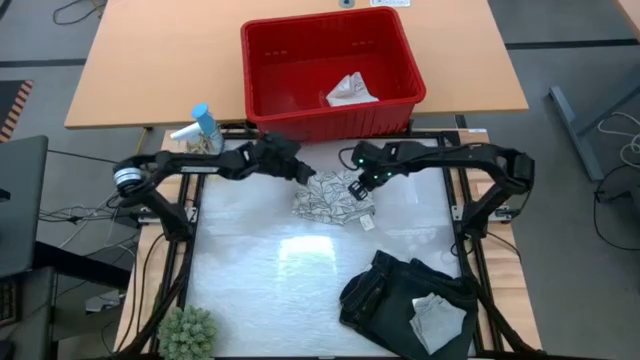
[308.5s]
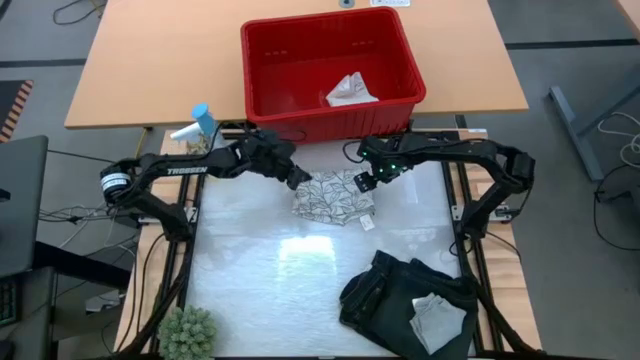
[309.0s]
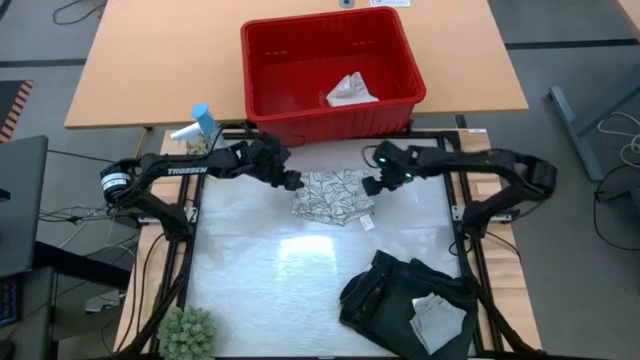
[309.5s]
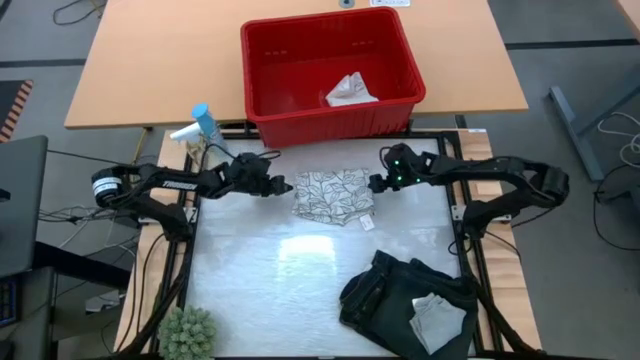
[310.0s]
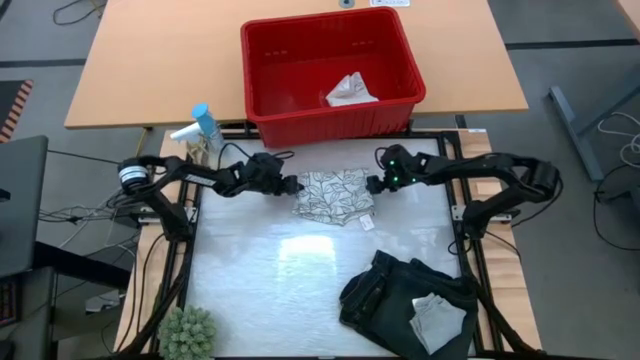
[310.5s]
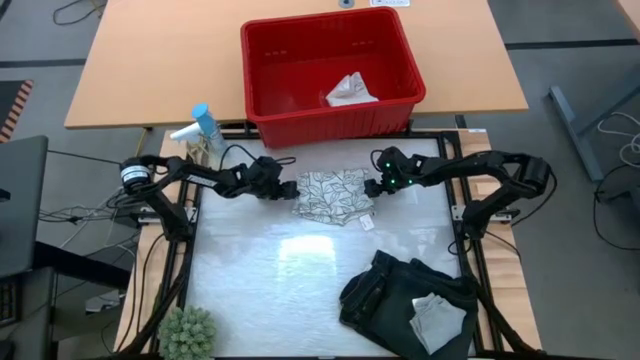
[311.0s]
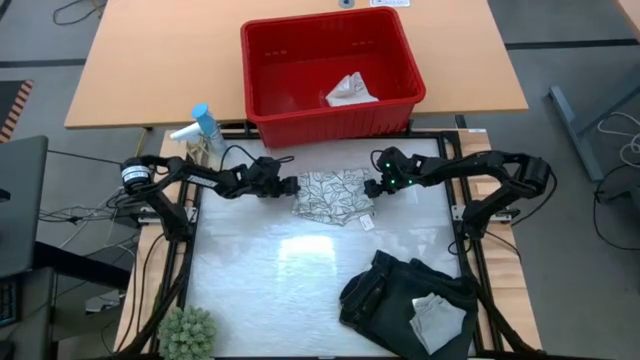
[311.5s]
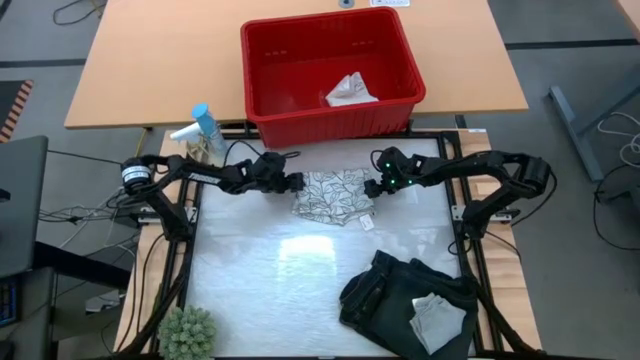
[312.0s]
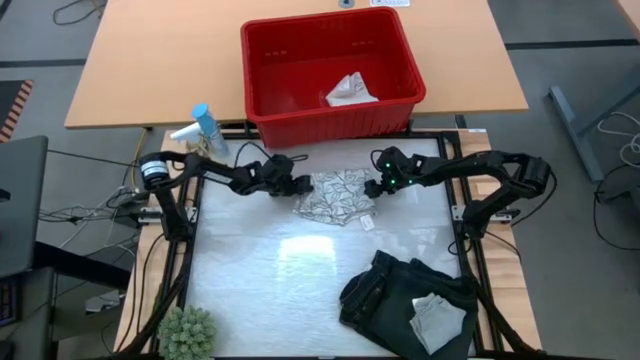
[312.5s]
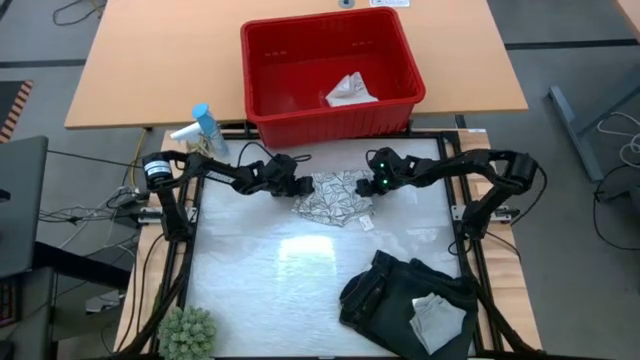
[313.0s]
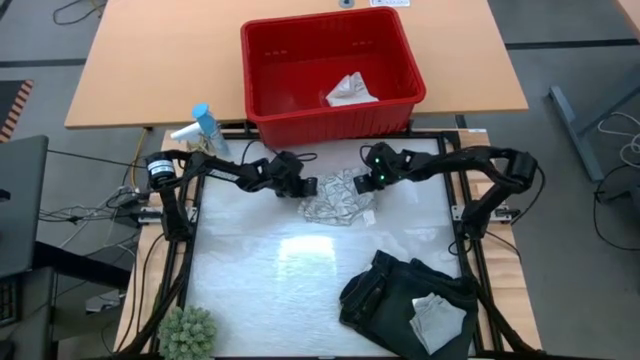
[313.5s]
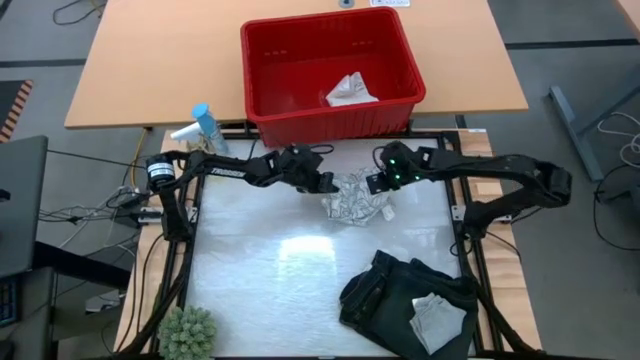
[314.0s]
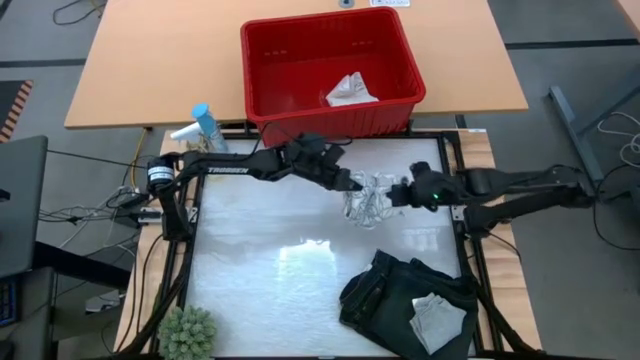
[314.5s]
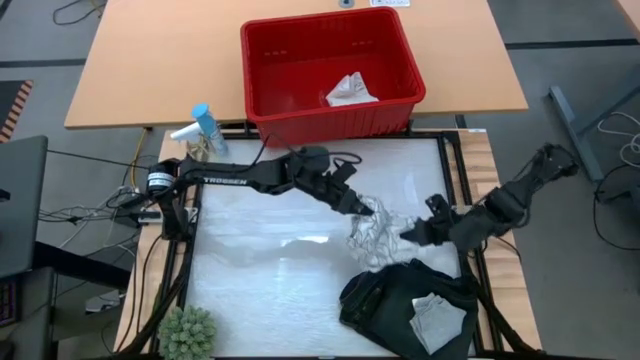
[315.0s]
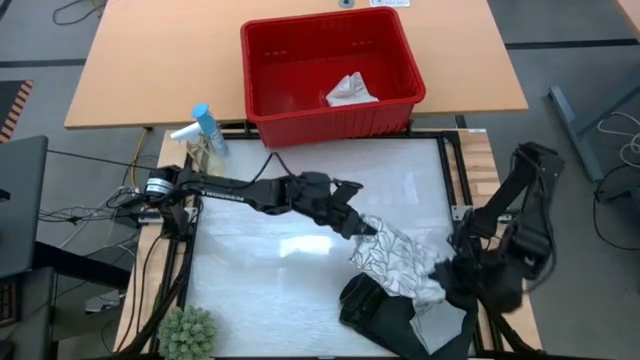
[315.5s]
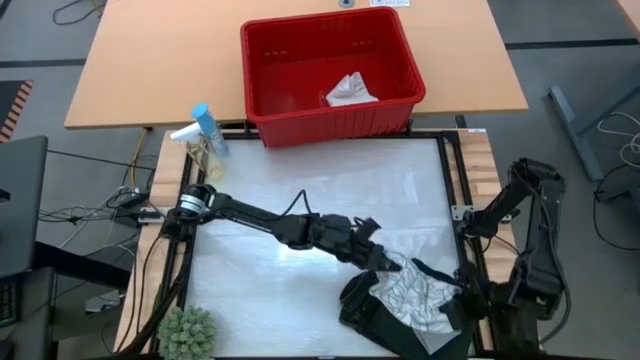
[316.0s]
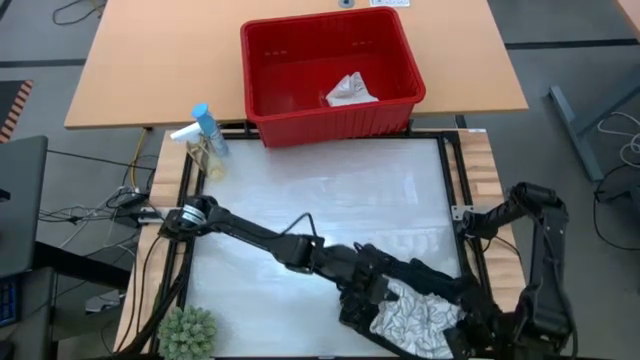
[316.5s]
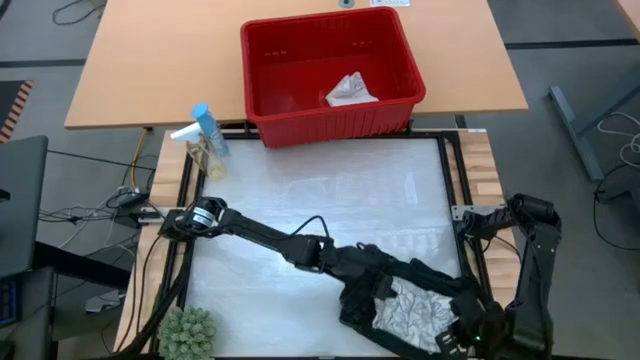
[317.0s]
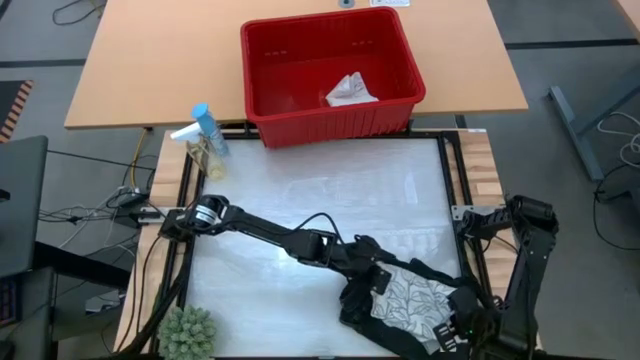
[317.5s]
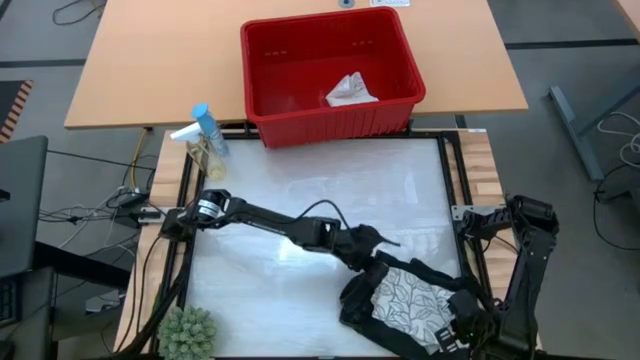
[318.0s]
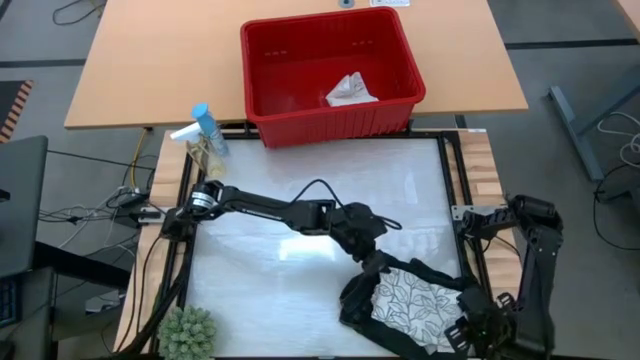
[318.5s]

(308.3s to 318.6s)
Task: Fold Laundry from Bin
Stack the white on top of the gray boxer

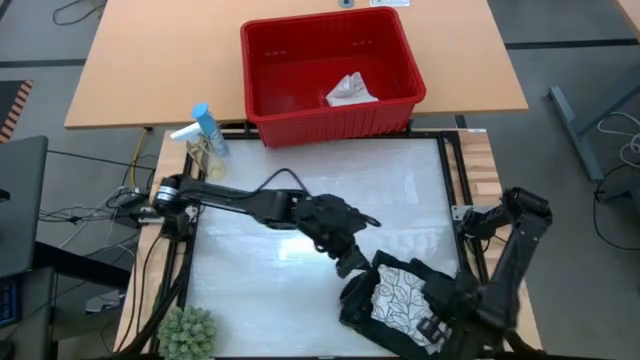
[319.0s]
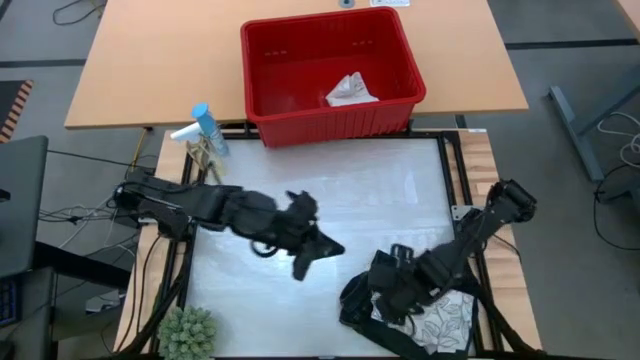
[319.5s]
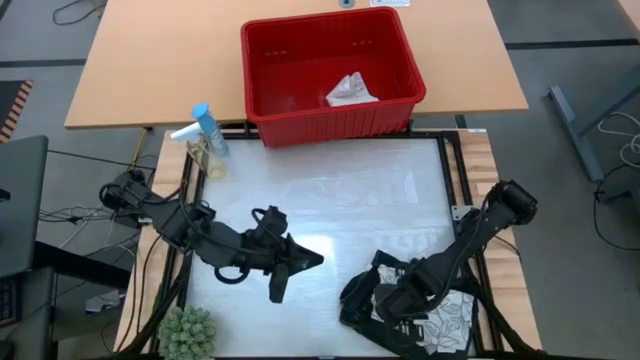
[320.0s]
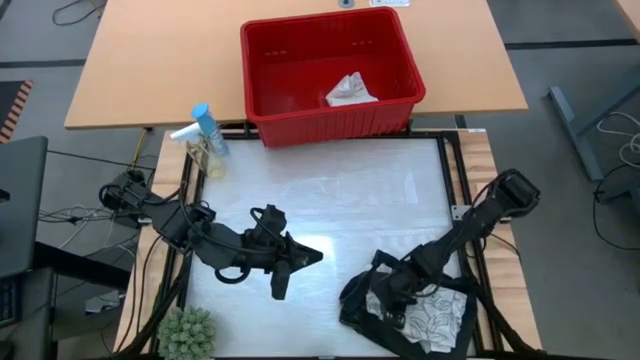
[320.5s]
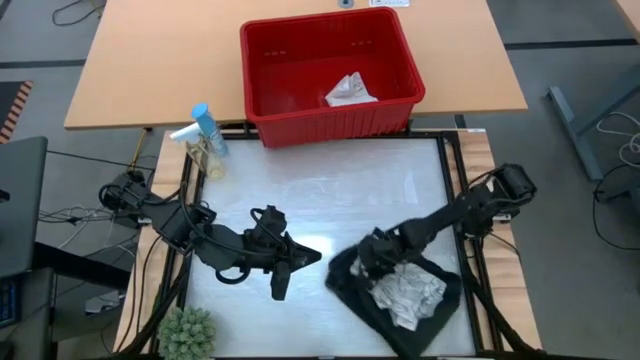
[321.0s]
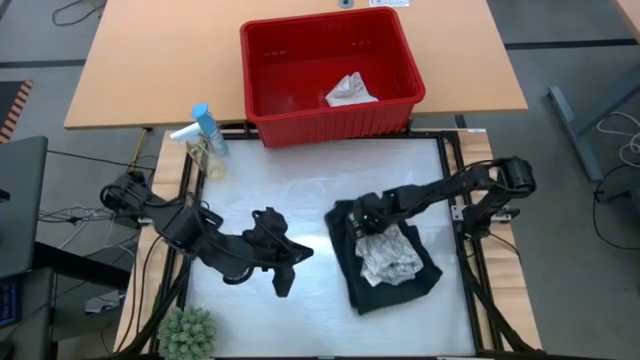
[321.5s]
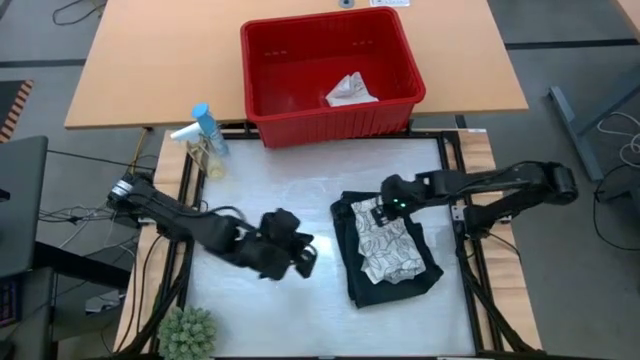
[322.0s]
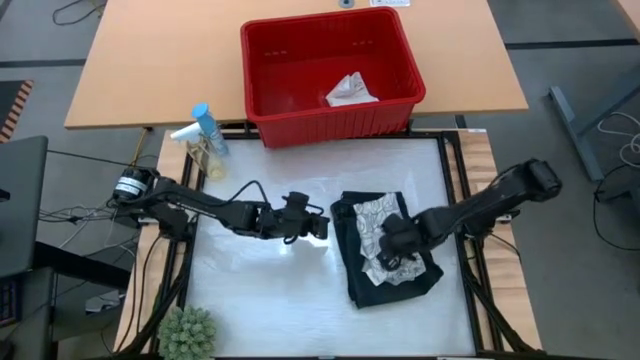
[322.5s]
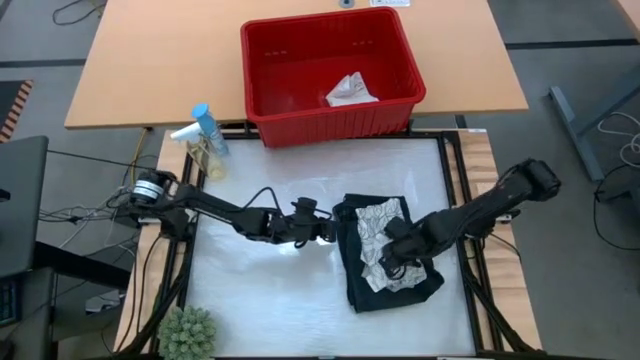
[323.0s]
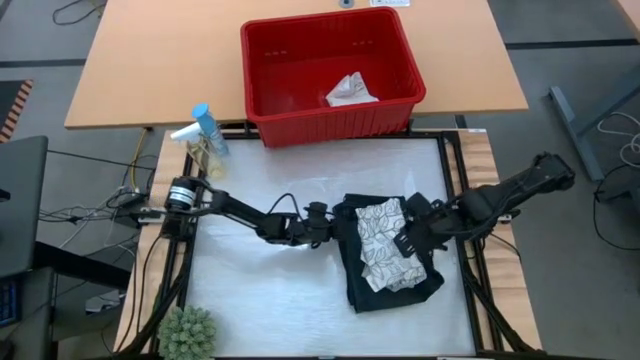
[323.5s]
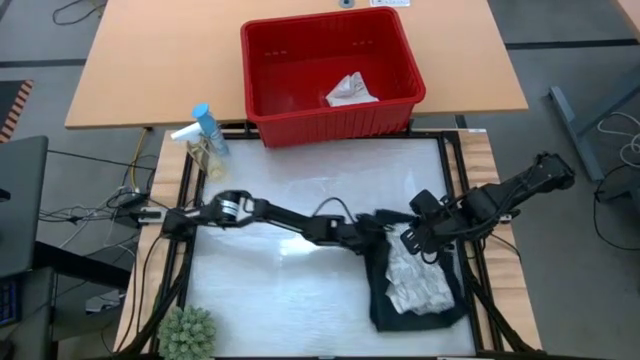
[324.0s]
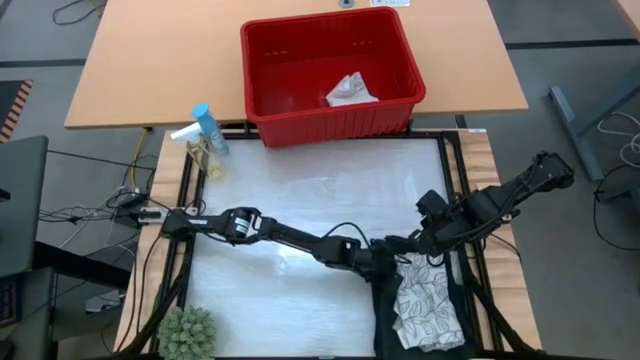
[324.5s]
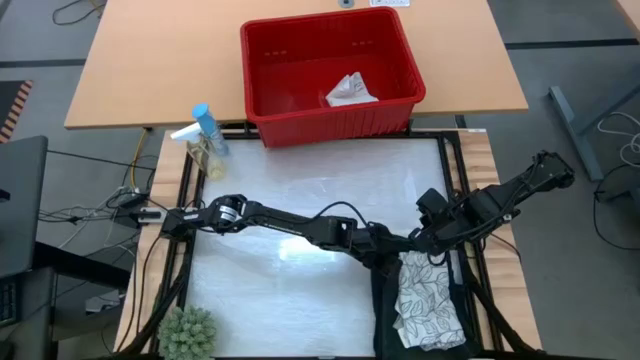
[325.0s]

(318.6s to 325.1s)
Adjust the stacked clothes

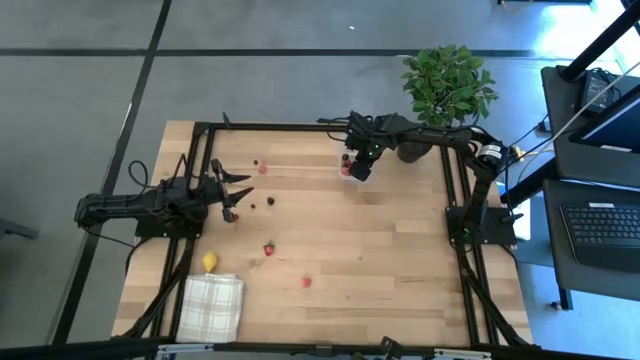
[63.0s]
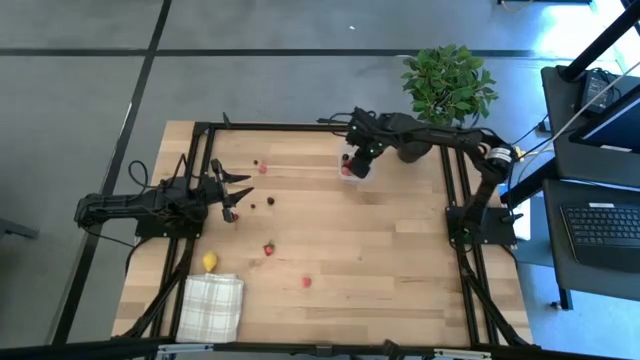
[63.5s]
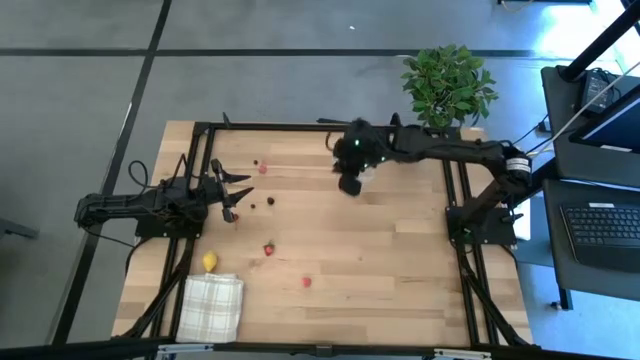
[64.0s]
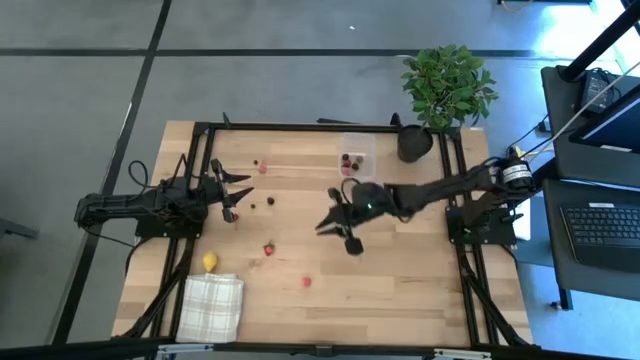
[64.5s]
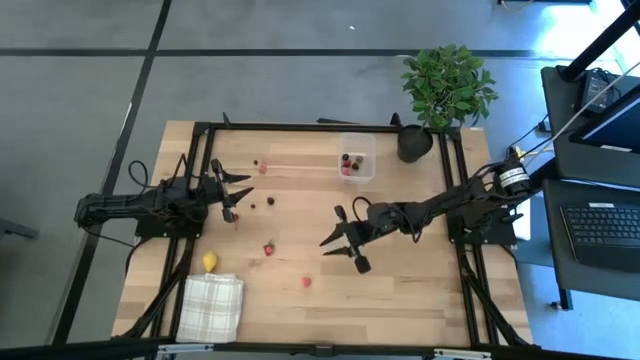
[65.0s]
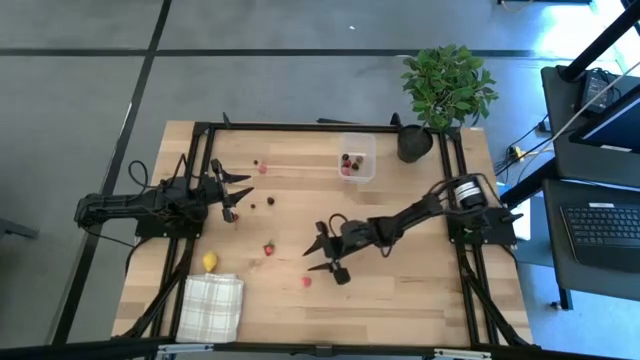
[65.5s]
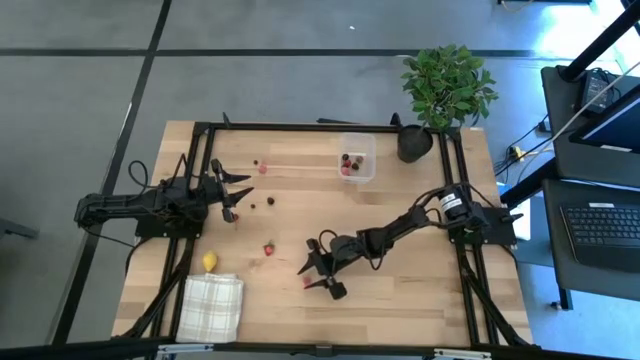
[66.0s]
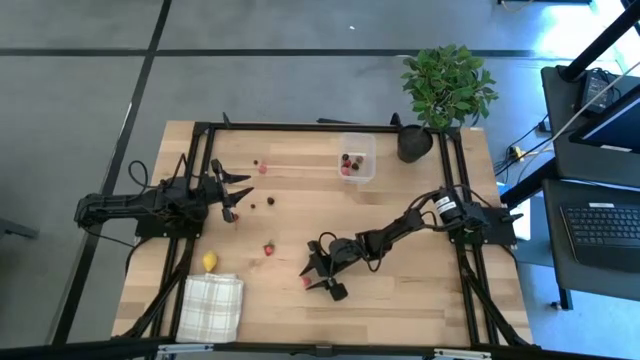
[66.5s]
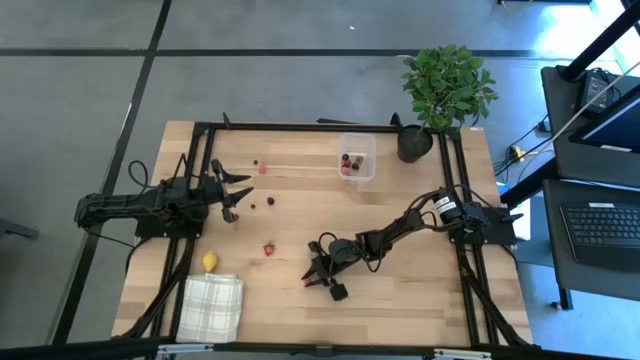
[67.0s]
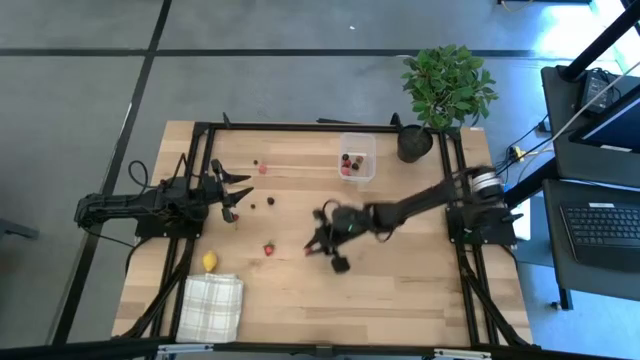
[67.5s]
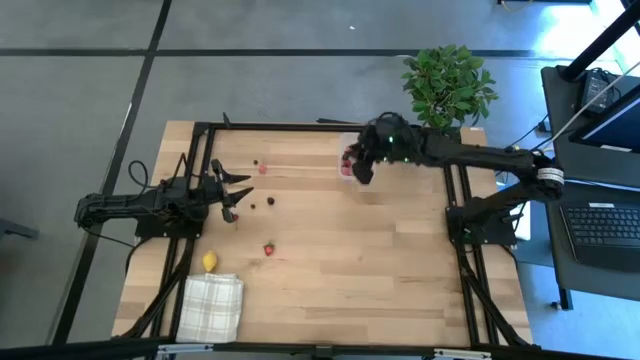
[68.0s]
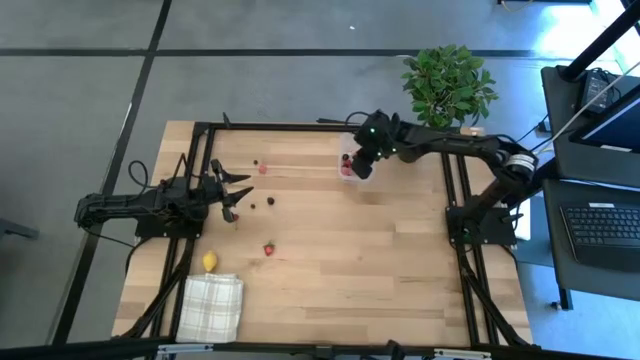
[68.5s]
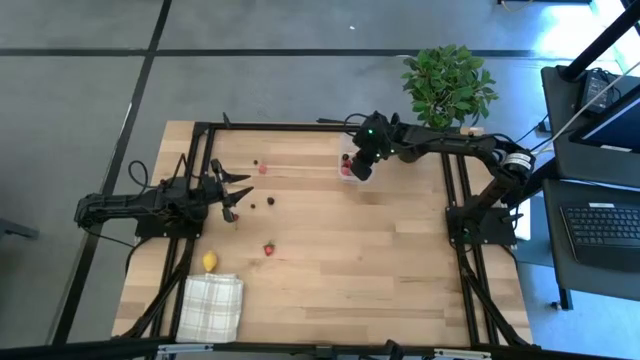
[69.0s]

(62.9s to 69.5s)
Task: Pick and placing Produce into tupperware
Put the bottom peach into the transparent bin
